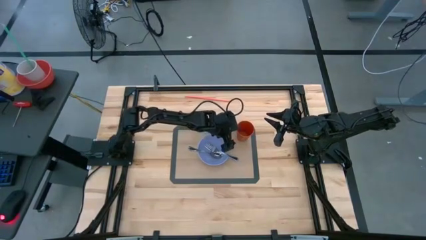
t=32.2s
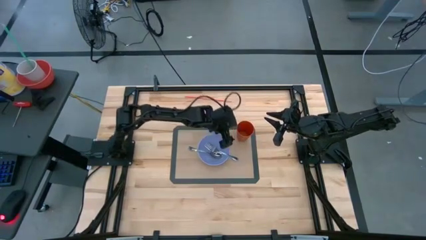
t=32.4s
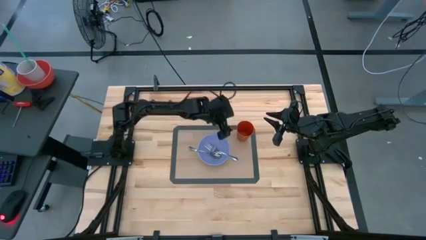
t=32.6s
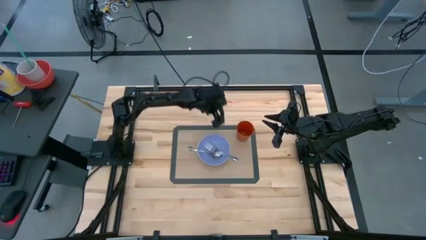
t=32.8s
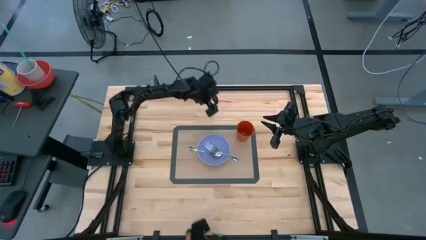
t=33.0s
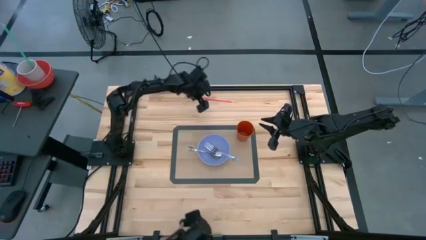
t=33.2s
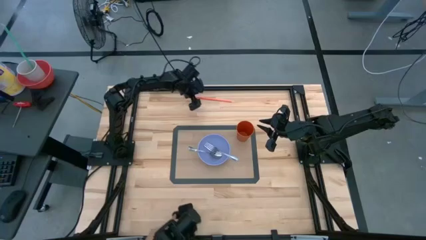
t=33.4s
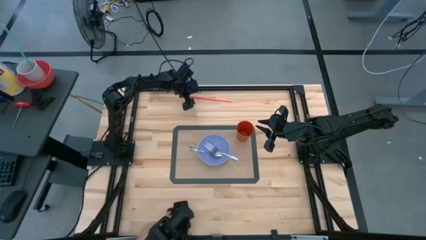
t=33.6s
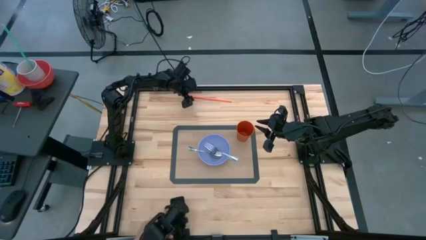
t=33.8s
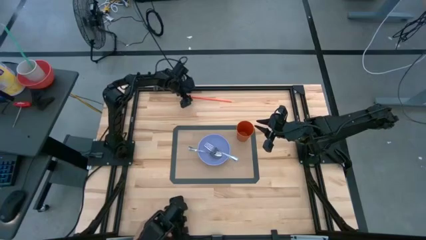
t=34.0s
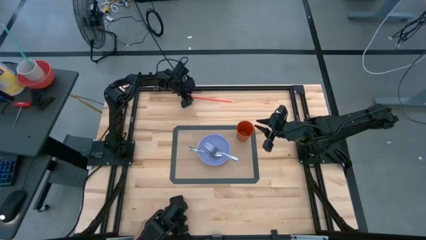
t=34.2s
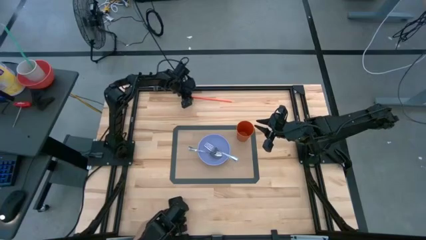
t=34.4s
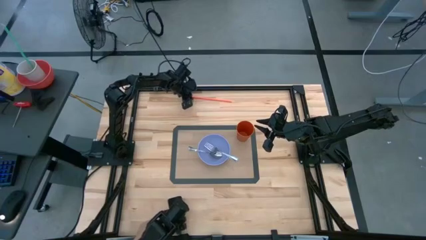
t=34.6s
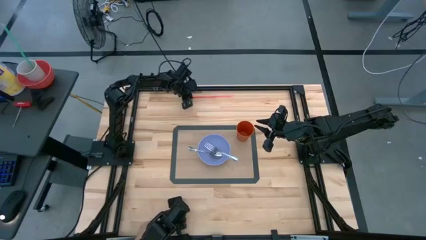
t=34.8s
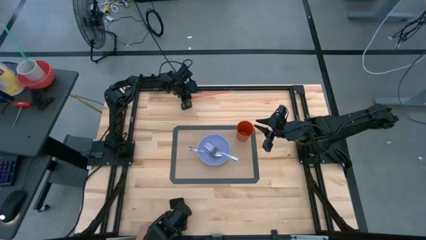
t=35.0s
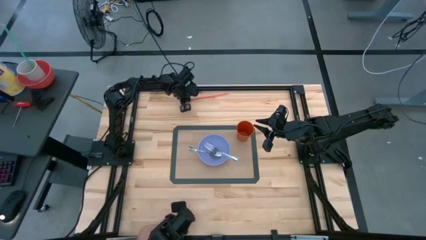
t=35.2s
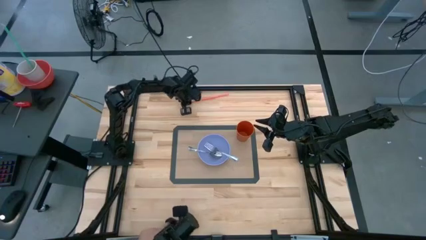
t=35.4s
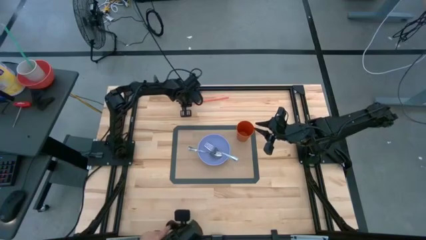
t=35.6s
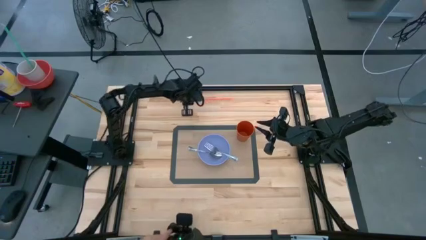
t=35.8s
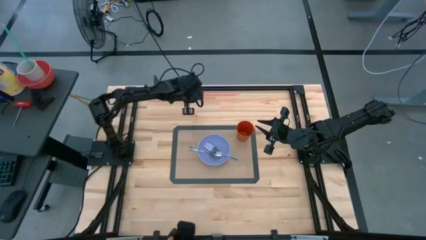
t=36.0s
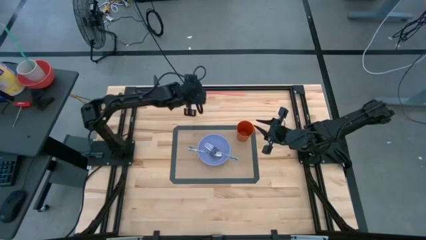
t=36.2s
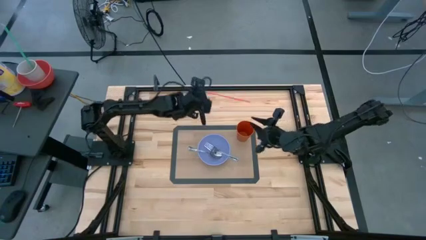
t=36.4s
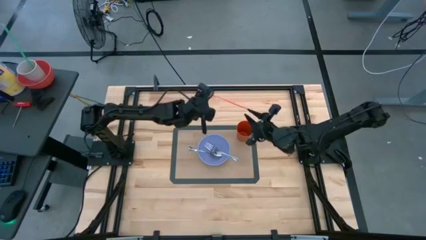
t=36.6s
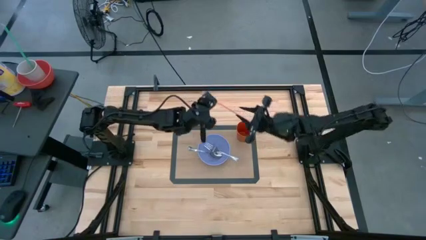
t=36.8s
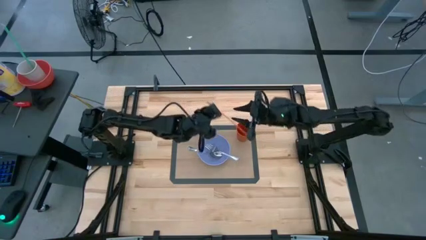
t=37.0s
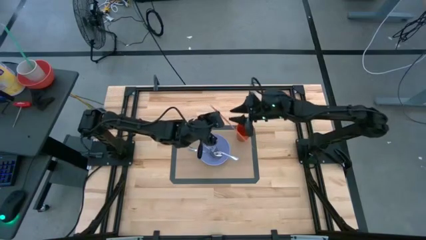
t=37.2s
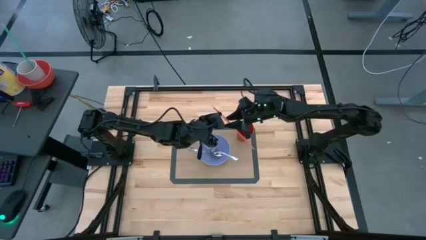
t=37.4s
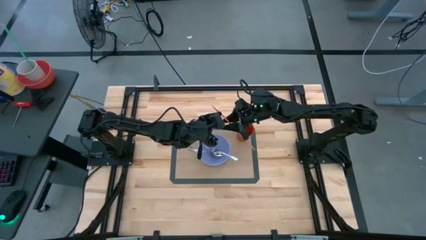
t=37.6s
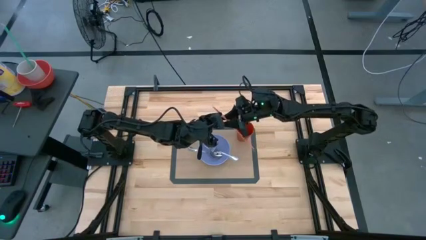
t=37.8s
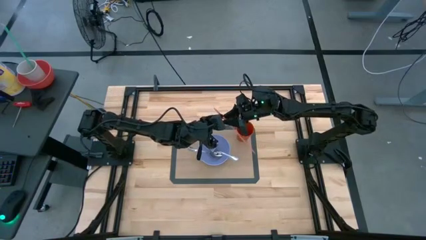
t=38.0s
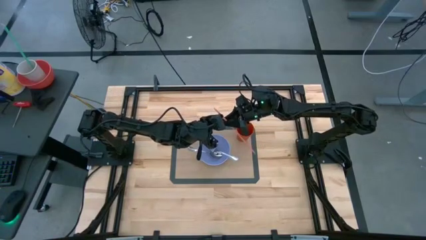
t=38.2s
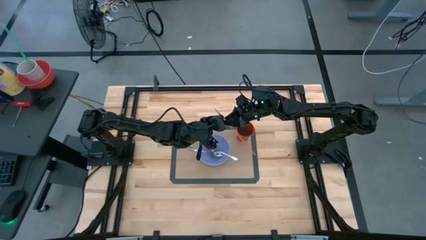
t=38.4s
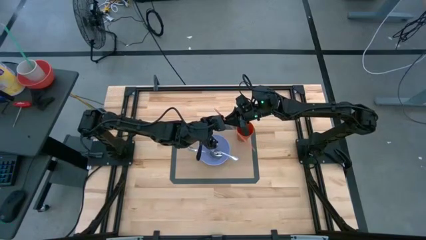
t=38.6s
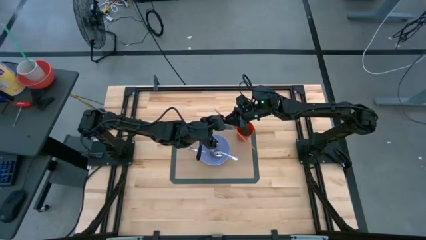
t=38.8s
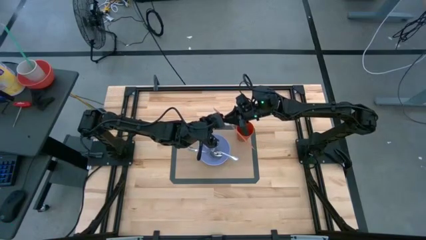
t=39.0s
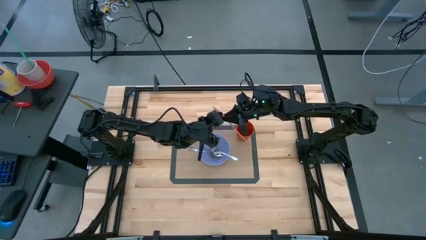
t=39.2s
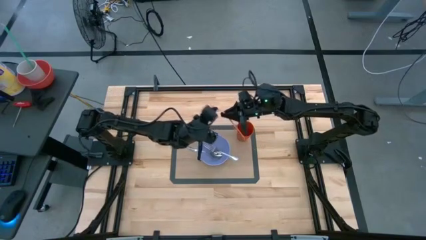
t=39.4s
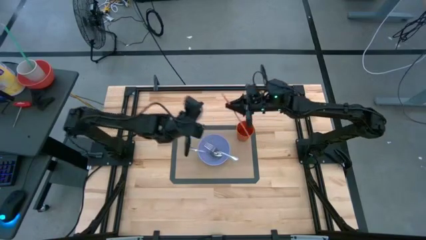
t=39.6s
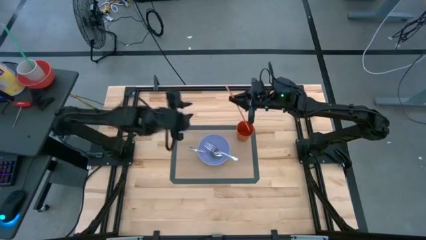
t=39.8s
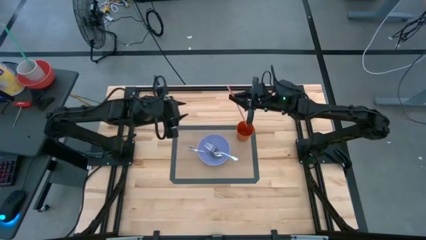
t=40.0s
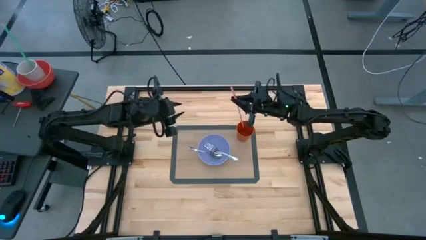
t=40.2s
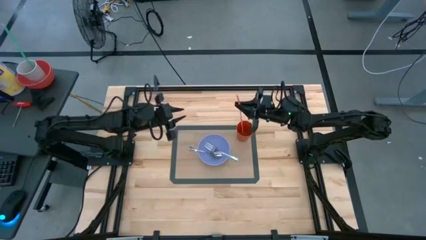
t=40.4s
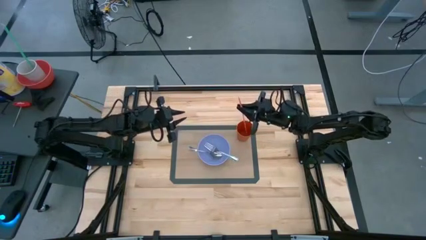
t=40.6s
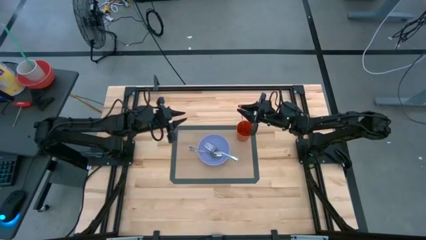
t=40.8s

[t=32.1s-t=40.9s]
Task: Pick & Place Utensil
Put the orange straw into the orange cup

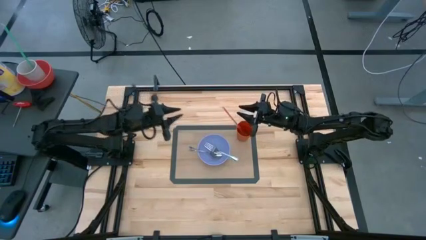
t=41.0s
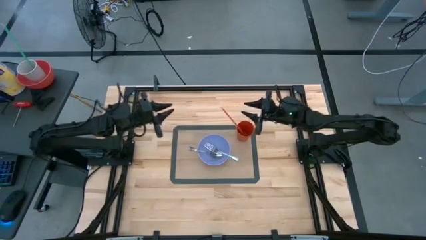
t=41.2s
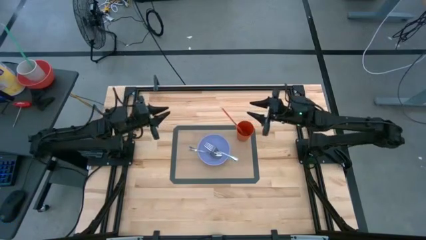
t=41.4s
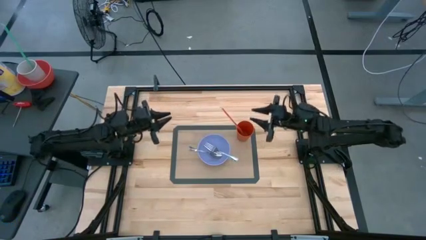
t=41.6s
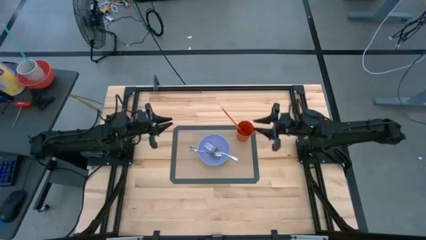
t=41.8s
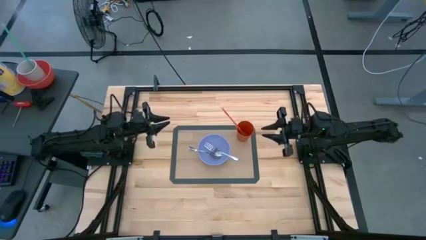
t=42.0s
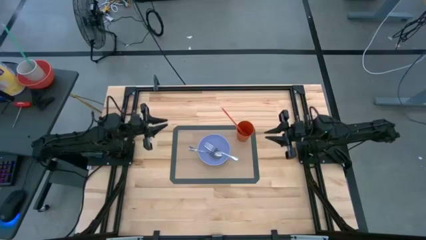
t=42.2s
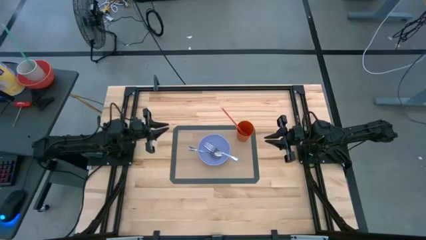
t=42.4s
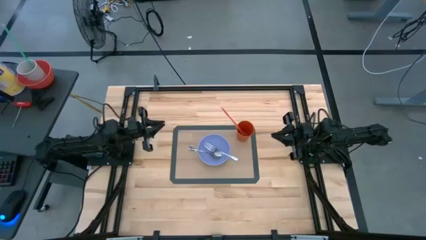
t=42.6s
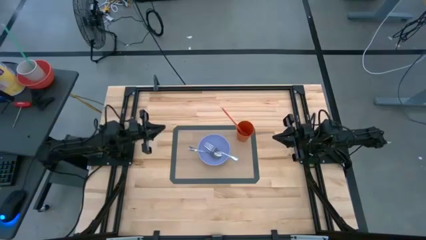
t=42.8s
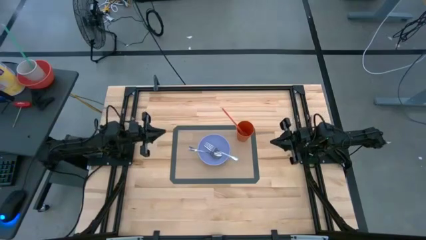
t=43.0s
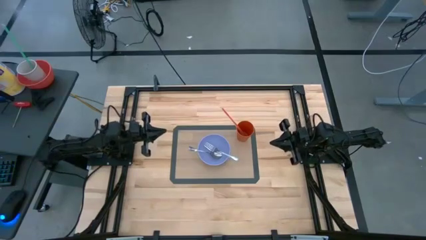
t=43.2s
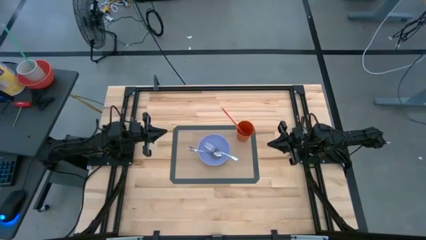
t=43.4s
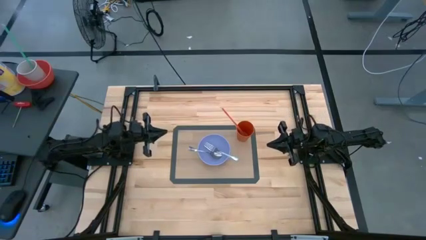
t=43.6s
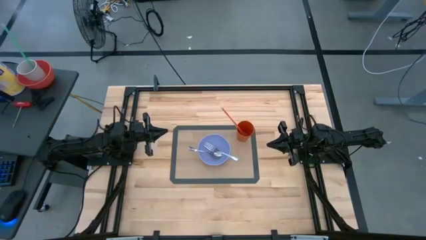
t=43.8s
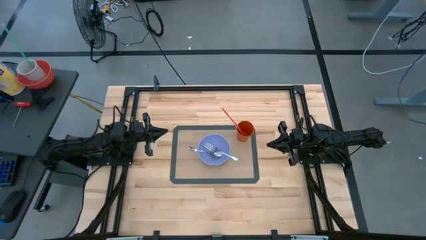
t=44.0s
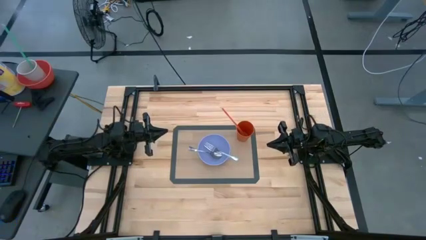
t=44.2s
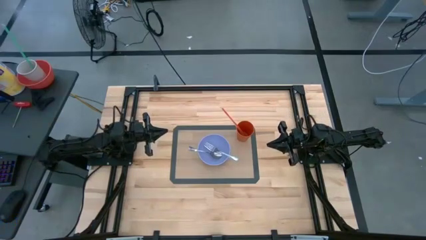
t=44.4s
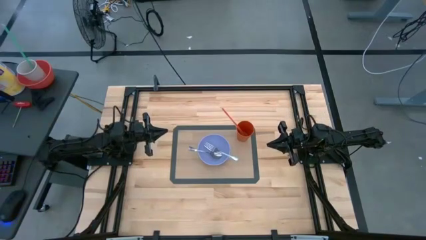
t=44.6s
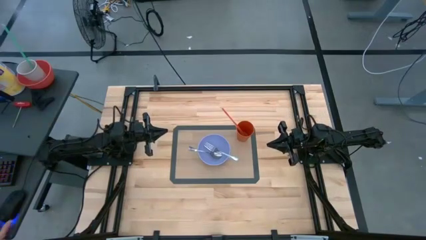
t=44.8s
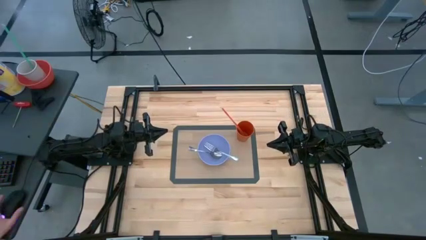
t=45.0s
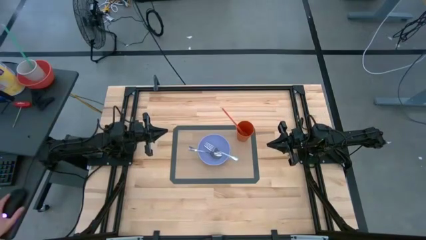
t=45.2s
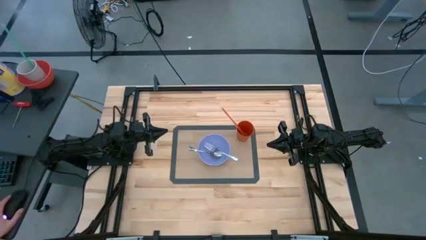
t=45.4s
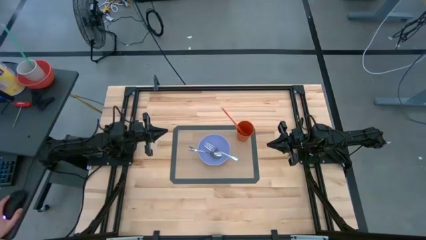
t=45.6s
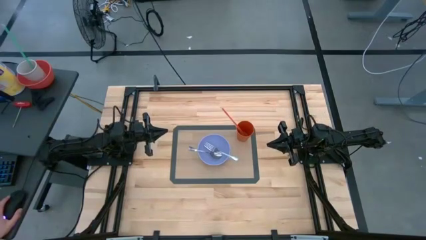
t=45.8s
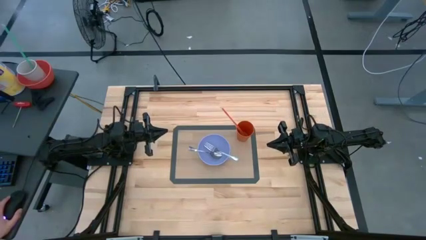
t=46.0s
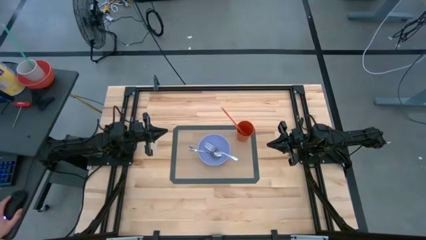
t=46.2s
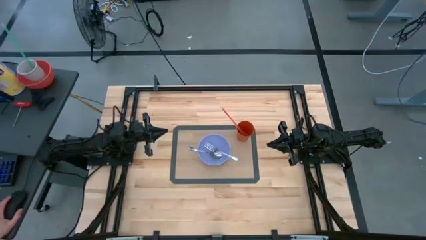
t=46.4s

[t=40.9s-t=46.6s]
Return to Home Position

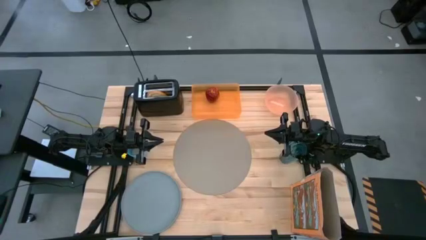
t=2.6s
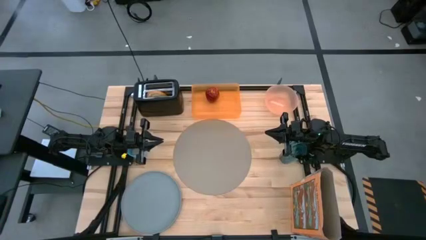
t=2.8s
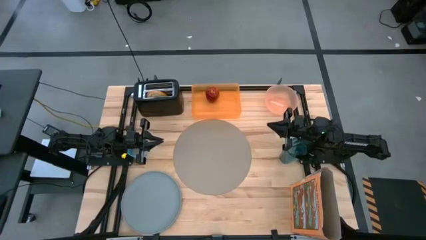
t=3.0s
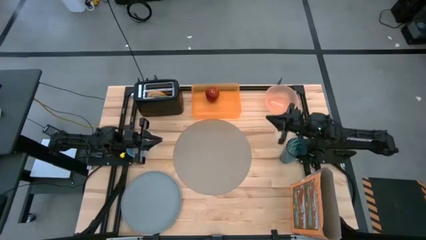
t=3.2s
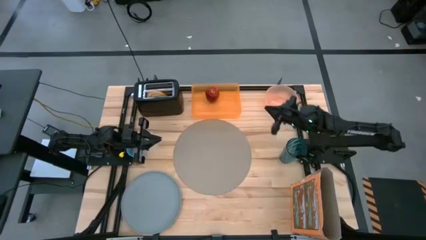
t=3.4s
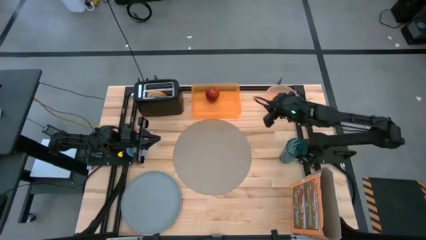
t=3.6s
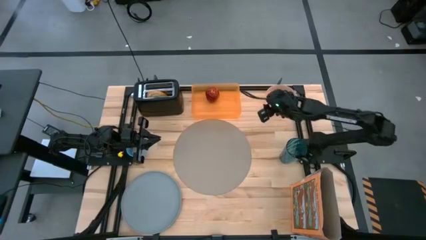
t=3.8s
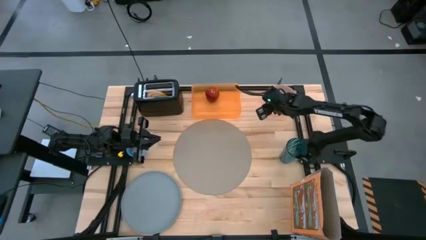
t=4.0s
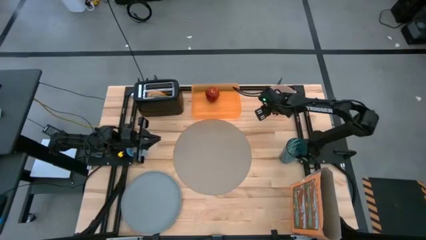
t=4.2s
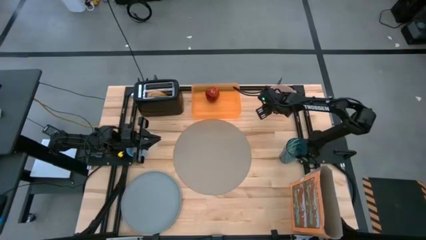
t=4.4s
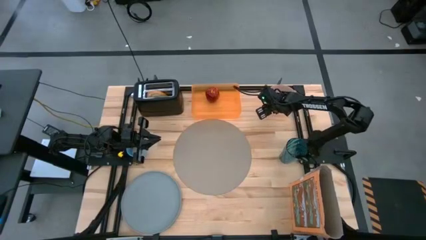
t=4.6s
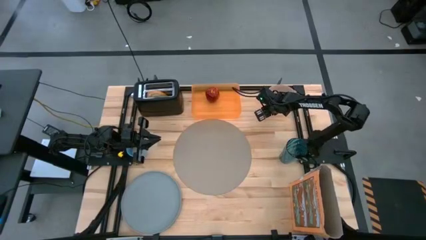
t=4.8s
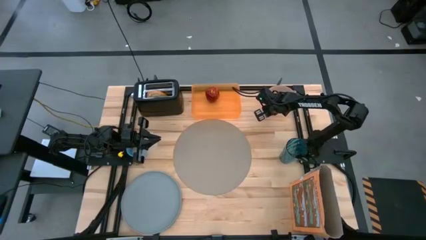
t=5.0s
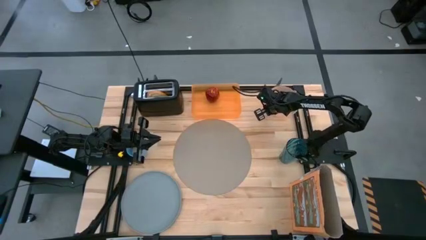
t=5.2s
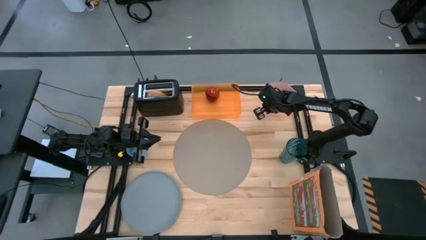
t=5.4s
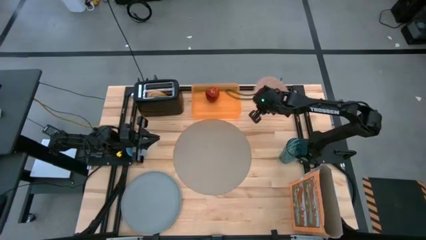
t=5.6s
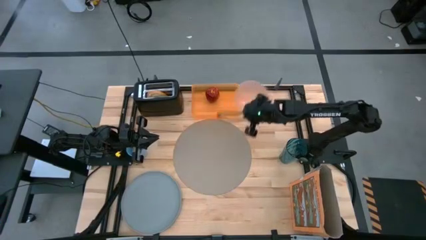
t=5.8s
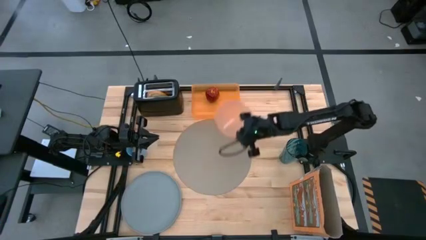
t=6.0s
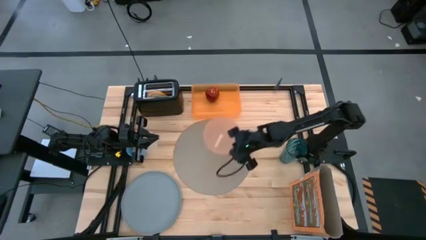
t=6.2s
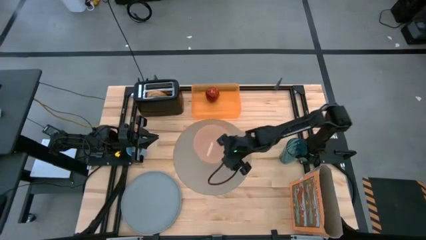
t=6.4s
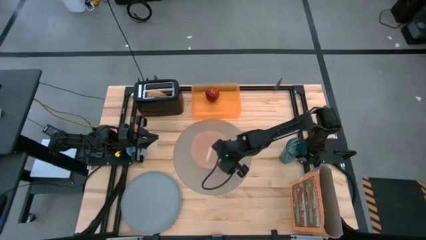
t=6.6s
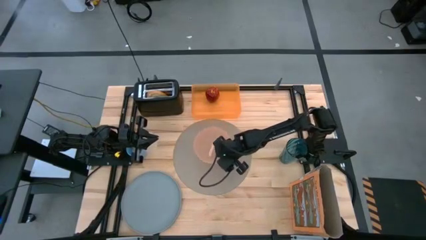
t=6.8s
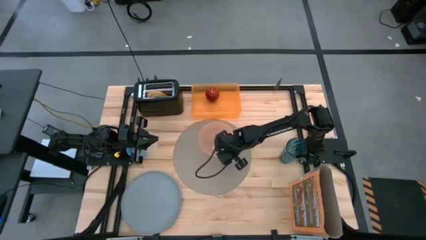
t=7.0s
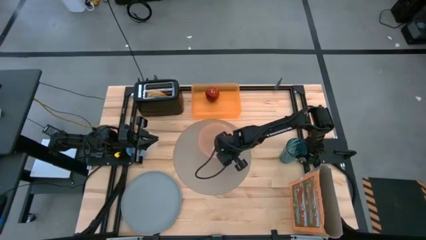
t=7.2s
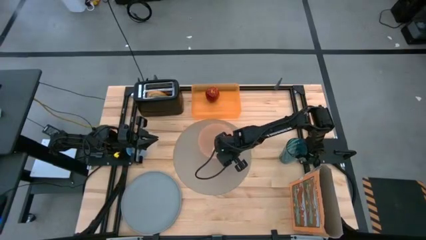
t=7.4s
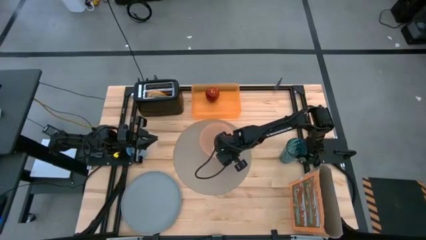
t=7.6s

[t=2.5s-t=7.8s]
Task: Arrange a breakfast setting
Put the light orange bowl on the gray mat
